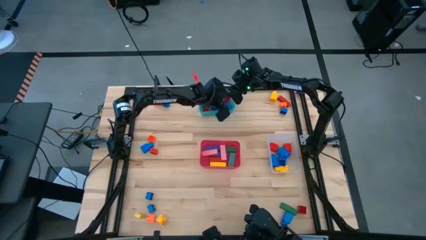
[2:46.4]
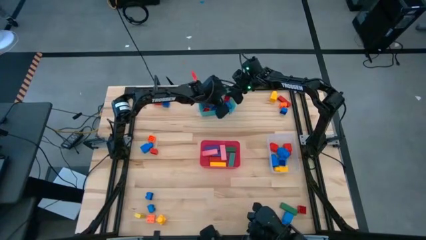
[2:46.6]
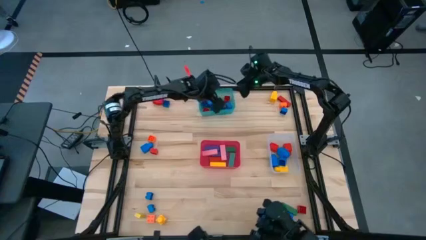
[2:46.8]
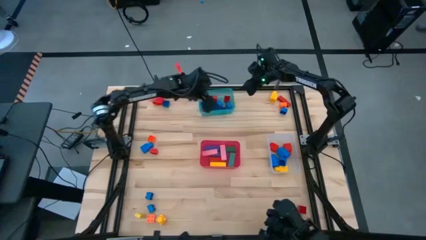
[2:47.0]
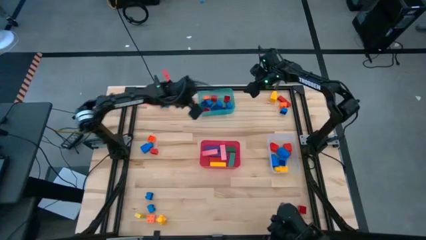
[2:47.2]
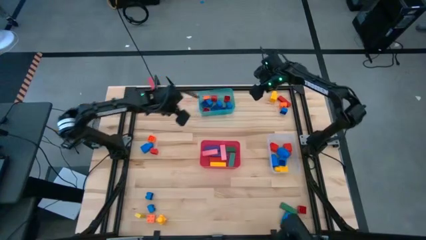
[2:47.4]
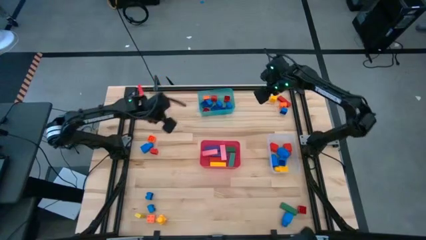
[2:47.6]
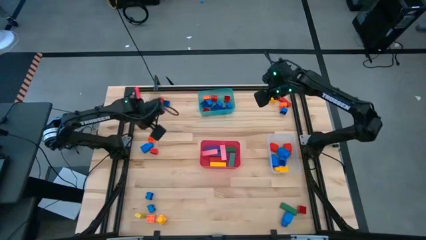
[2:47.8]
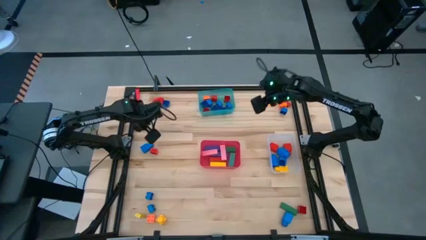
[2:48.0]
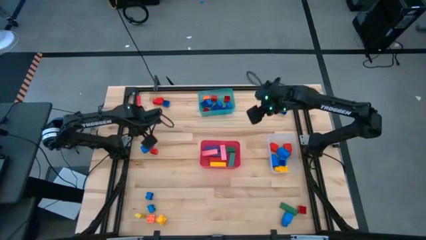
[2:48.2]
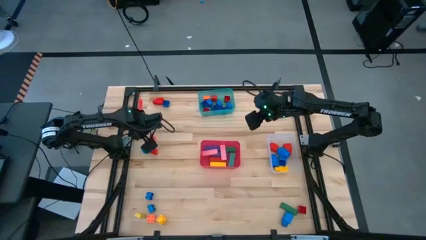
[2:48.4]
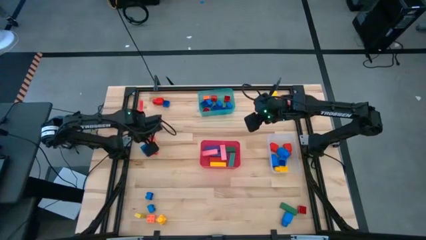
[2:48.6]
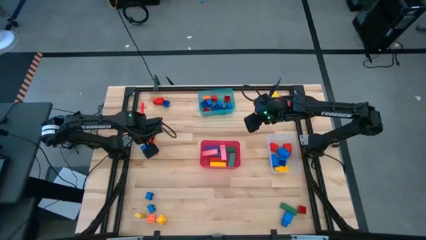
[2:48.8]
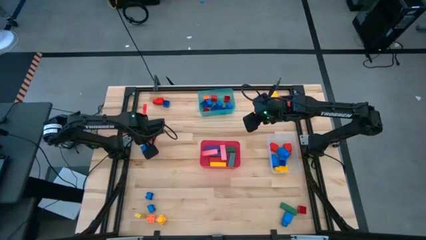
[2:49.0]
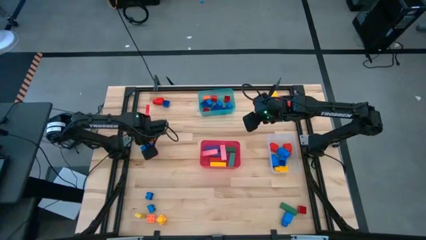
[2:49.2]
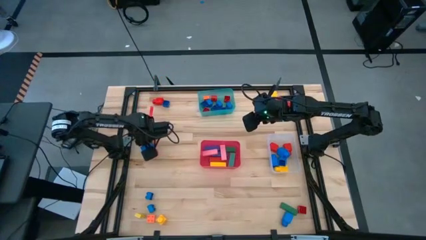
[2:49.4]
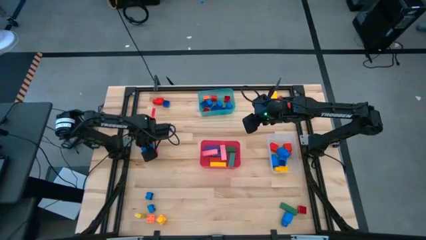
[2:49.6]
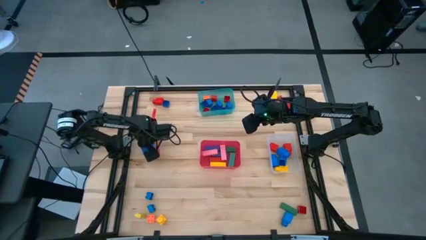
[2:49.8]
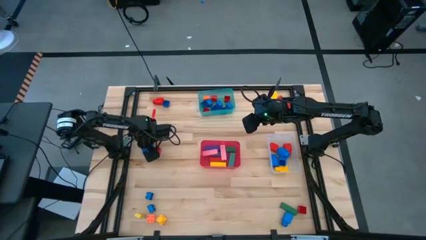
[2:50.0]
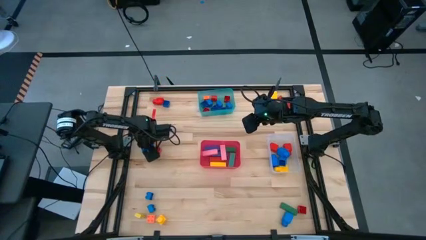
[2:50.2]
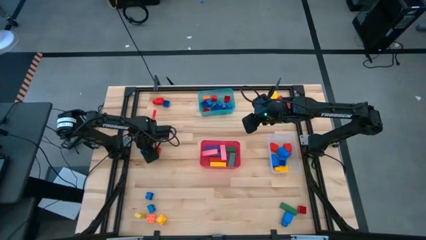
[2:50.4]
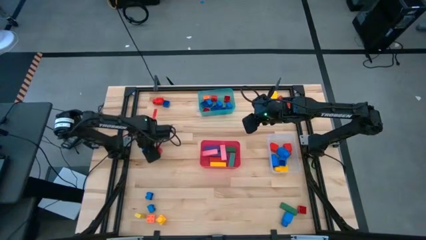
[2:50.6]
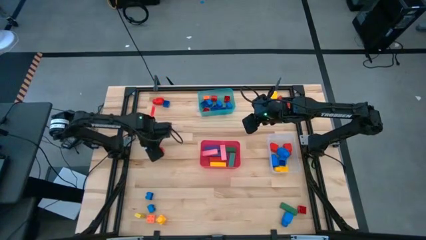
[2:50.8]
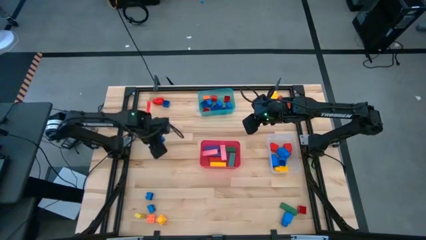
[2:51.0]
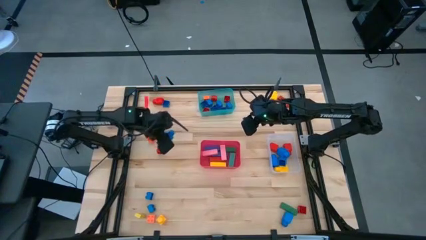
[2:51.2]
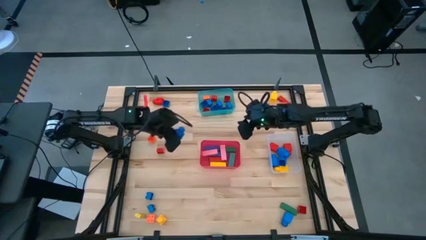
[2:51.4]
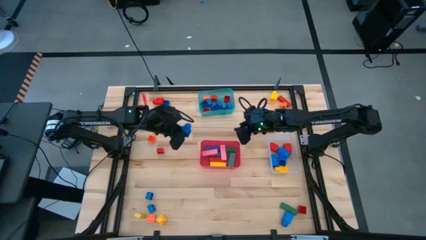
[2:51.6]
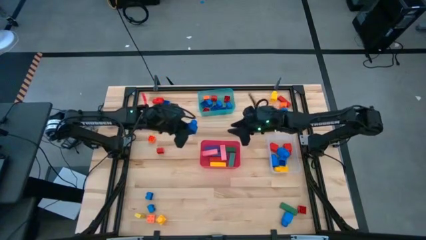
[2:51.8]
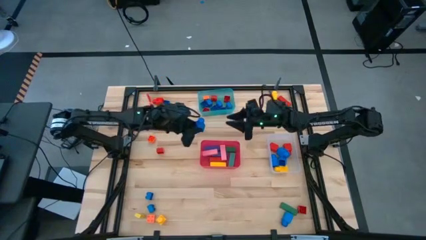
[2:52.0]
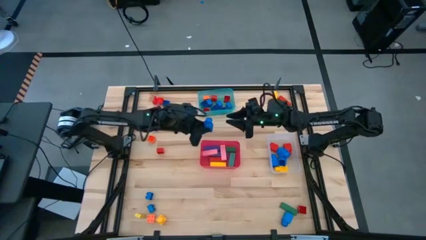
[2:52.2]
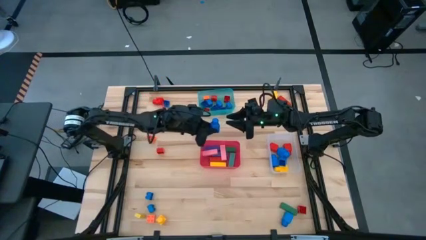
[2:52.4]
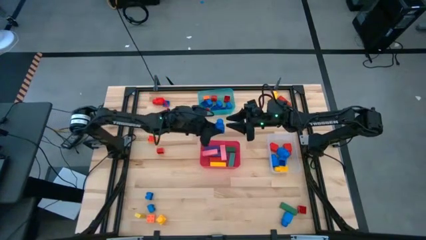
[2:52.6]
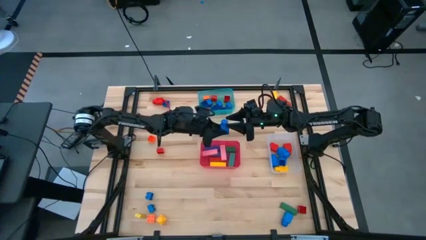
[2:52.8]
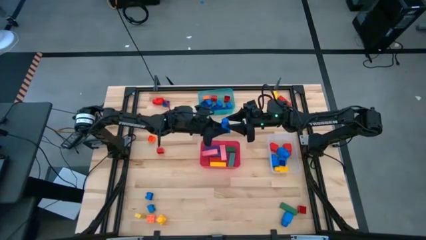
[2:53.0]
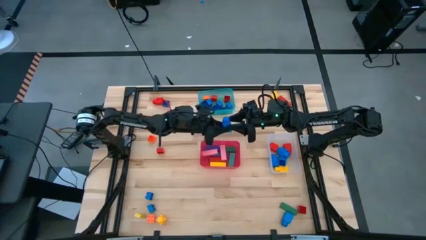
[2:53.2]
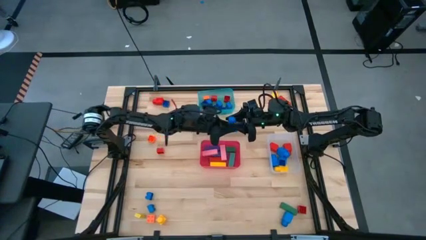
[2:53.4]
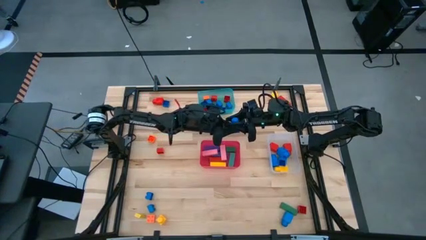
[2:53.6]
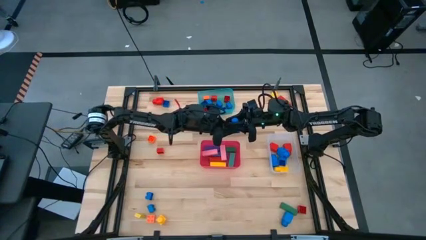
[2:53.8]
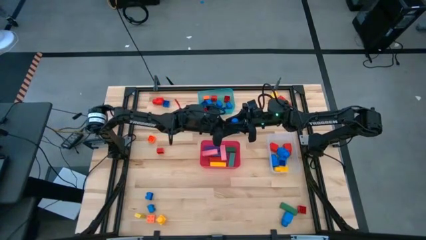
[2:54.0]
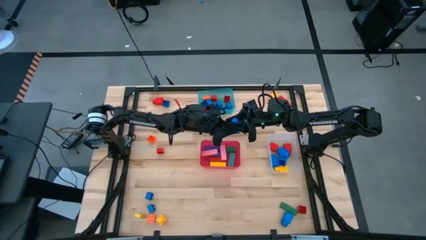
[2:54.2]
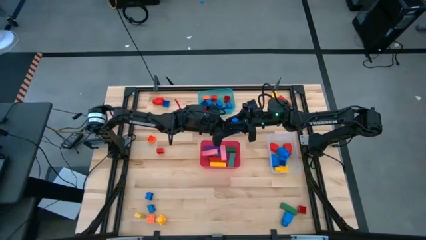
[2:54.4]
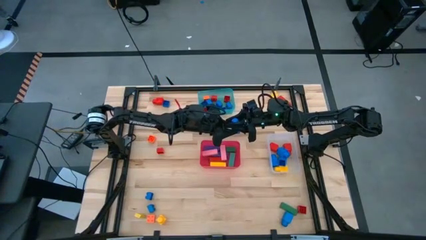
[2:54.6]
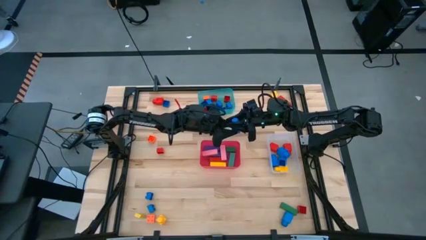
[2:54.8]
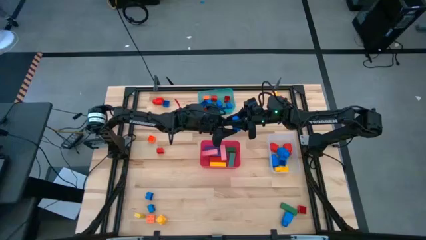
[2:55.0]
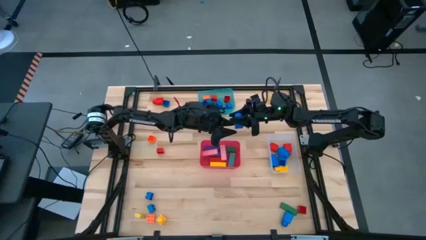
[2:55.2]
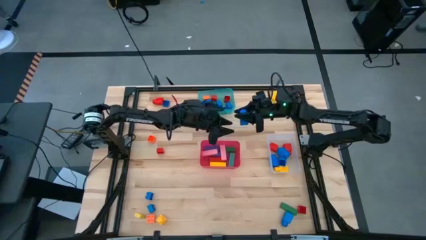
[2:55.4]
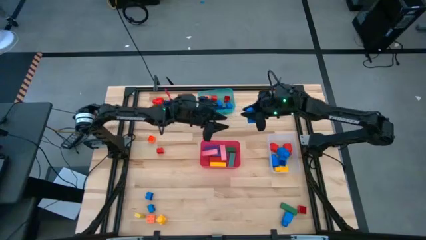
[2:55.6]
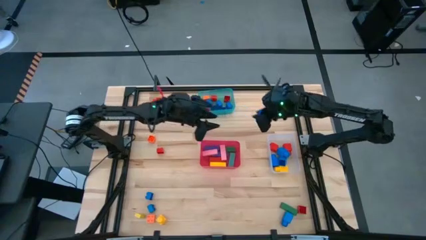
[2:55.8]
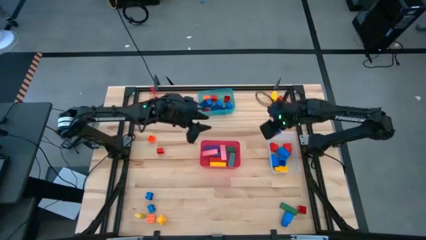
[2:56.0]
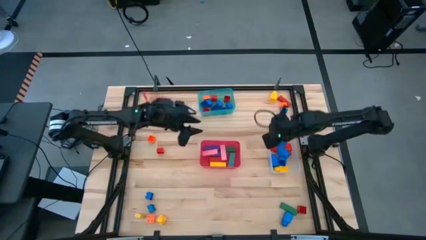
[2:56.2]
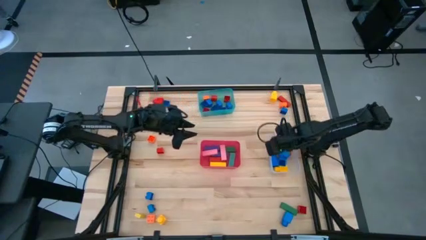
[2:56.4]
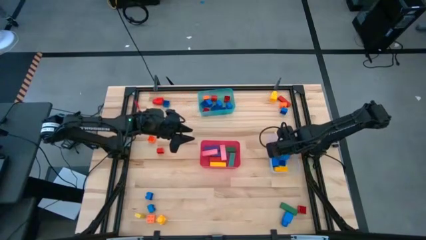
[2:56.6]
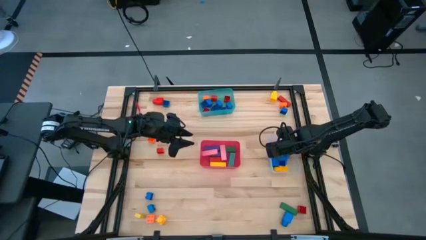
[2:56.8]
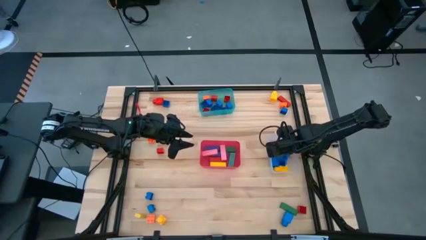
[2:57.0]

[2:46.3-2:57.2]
Task: Sort blocks by size
Put the blue 1 stud game piece into the transparent bin

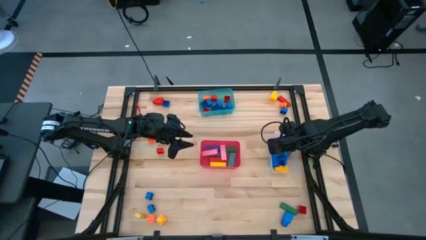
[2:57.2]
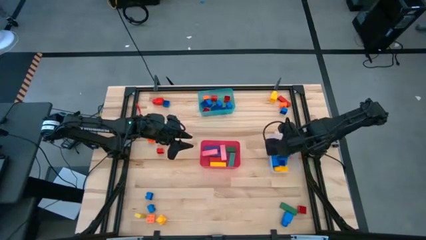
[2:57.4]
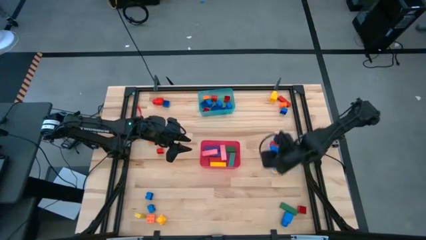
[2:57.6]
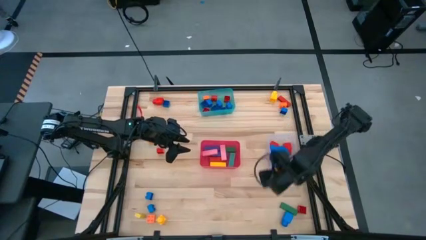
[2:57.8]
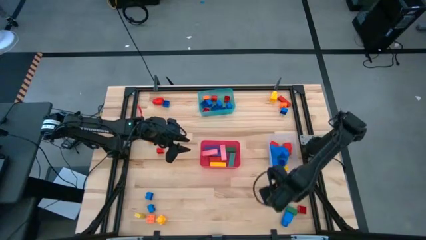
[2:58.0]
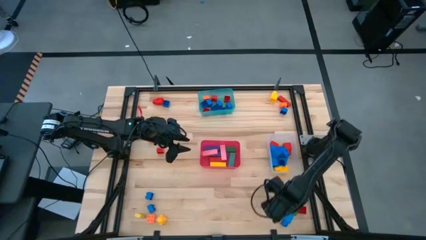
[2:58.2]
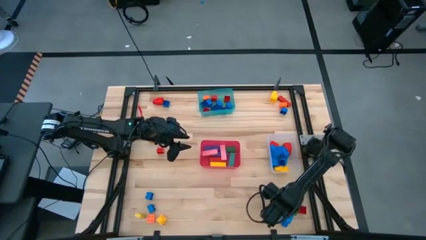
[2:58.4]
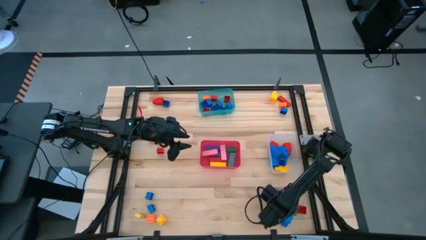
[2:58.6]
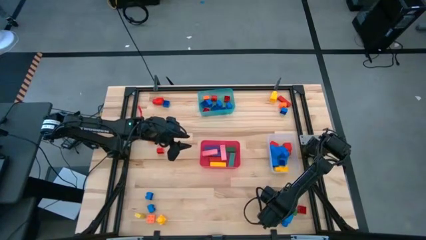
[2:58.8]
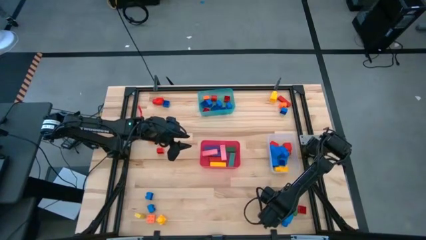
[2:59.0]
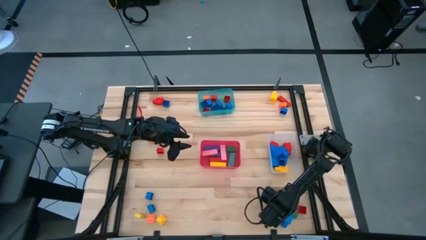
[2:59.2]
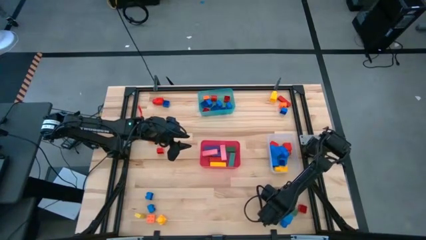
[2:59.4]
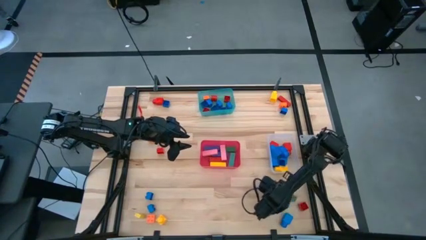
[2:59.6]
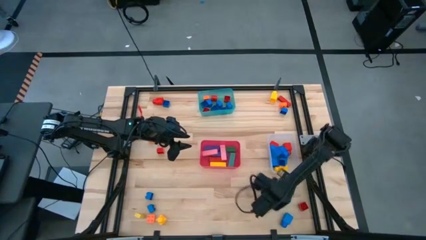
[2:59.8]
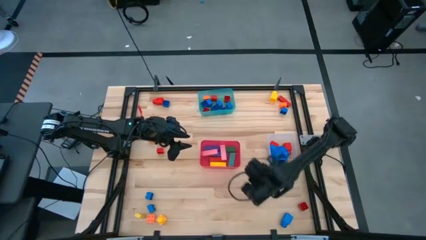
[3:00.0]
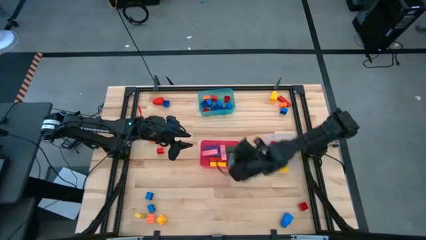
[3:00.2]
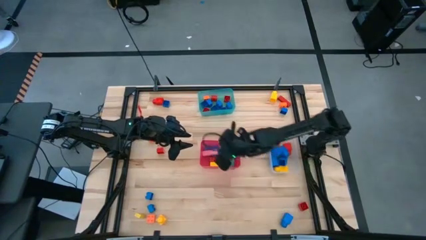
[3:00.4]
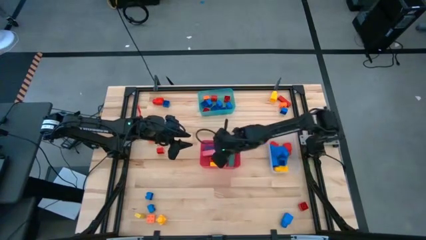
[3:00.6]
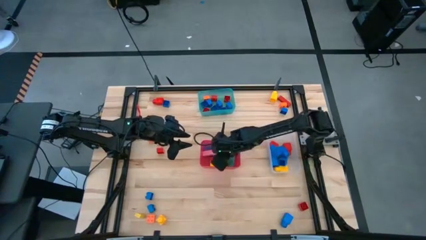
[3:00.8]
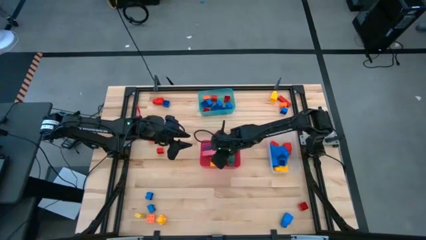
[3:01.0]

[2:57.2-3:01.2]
Put the green block into the red bin

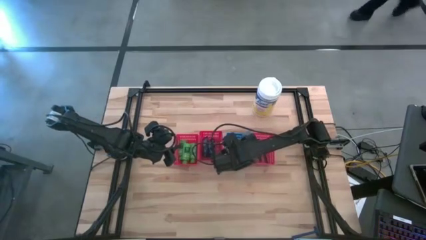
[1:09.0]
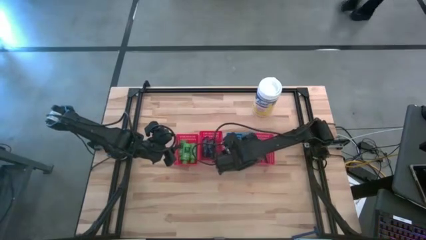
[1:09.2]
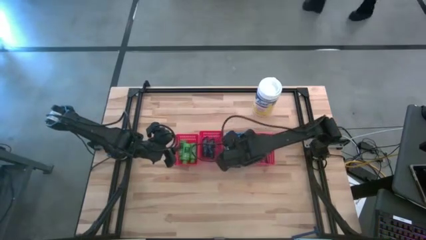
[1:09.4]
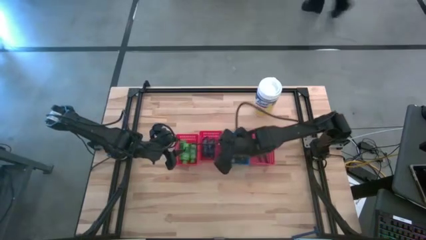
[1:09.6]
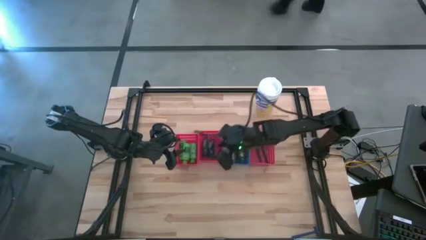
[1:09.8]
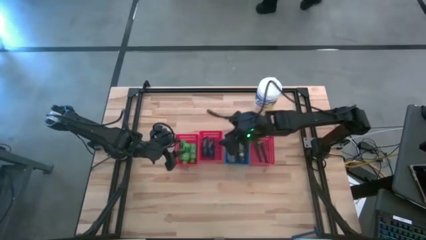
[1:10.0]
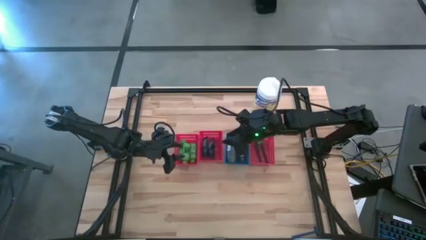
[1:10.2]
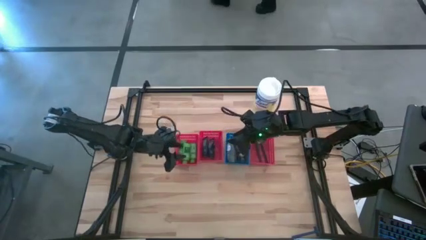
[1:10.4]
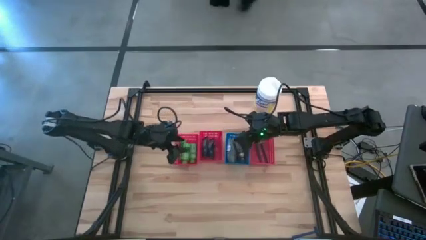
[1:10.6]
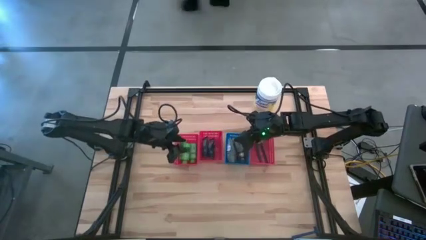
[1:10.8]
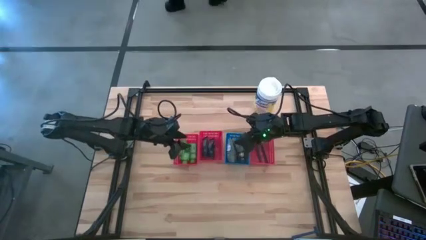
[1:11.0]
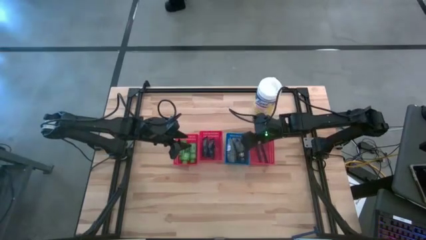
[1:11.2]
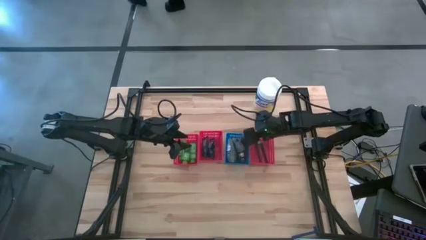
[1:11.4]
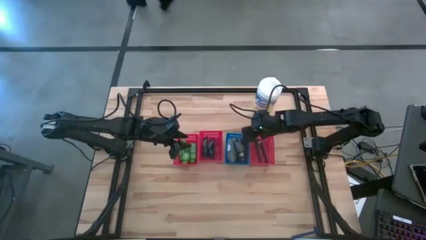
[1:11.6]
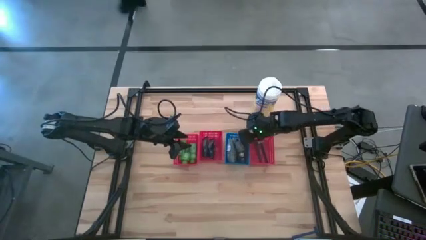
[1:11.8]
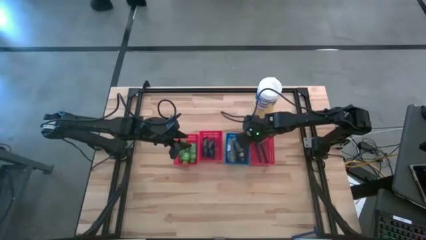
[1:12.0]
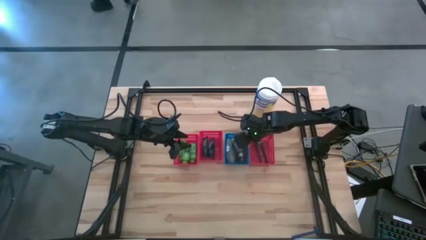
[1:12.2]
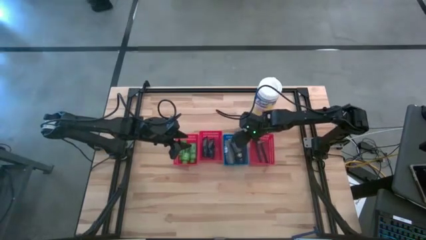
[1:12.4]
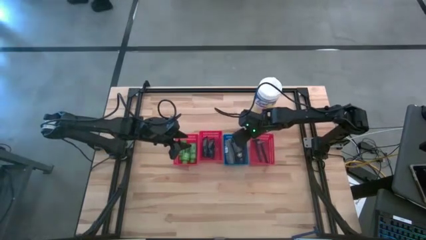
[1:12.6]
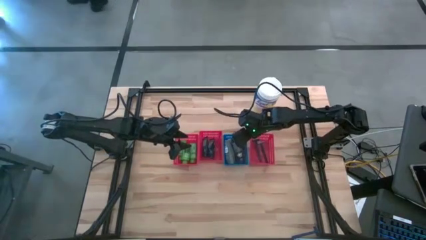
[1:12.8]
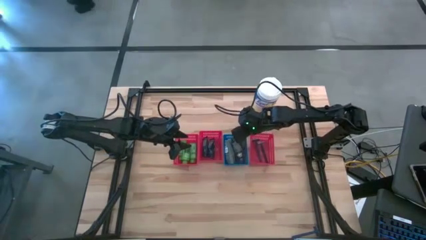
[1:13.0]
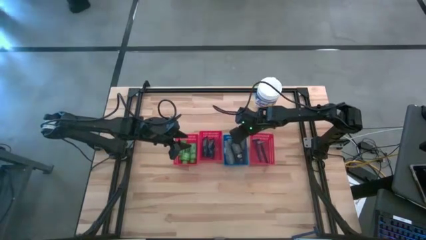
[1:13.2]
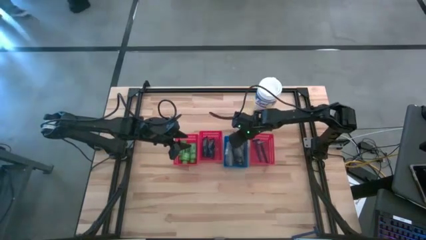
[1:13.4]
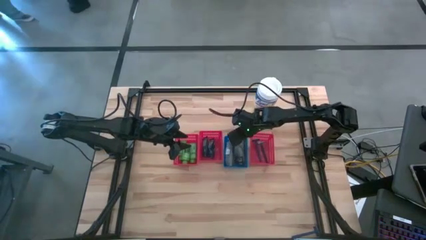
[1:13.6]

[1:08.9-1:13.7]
Task: Pick & Place Travel size toiletries
Adjust the blue bin
